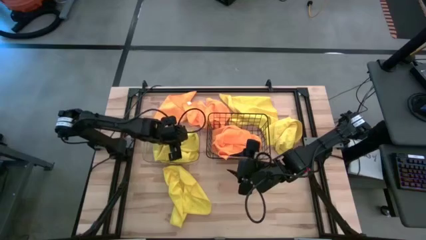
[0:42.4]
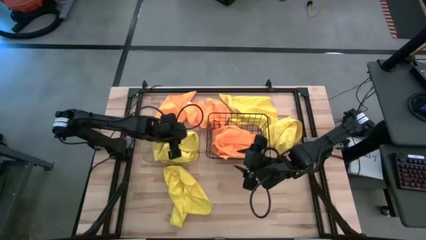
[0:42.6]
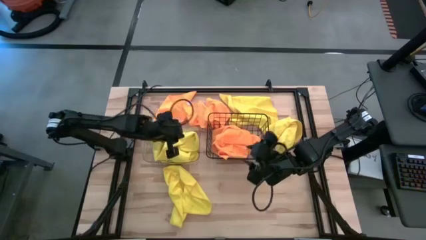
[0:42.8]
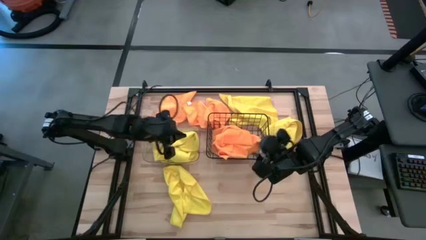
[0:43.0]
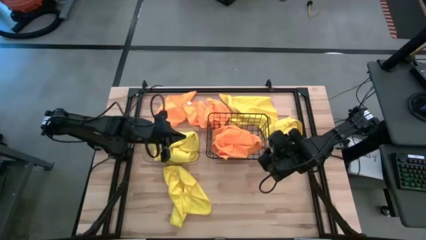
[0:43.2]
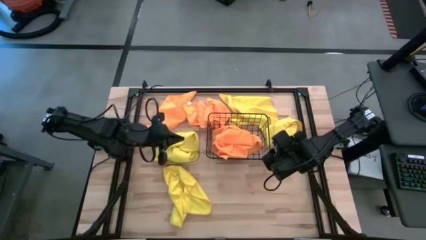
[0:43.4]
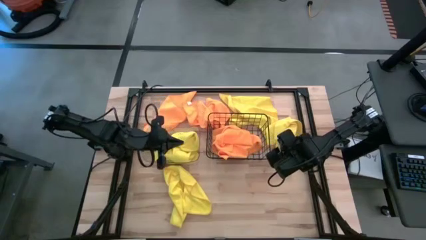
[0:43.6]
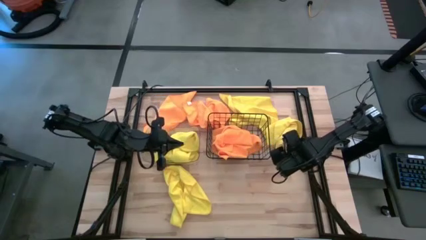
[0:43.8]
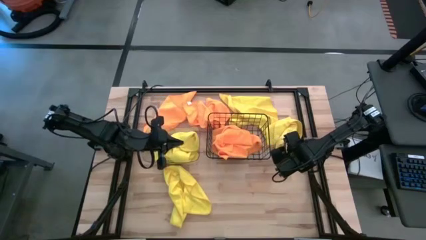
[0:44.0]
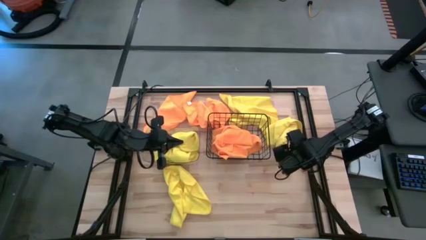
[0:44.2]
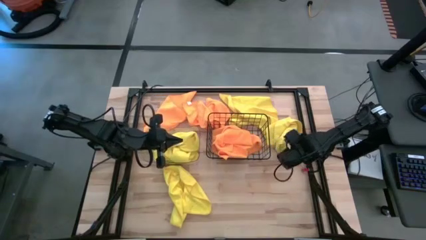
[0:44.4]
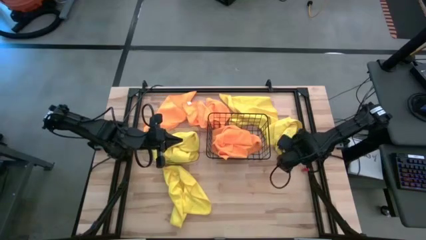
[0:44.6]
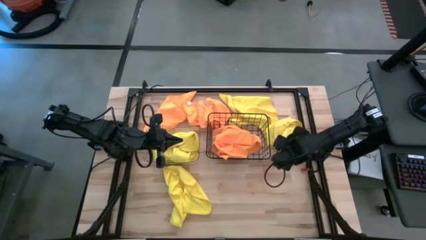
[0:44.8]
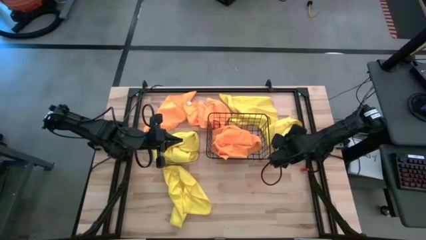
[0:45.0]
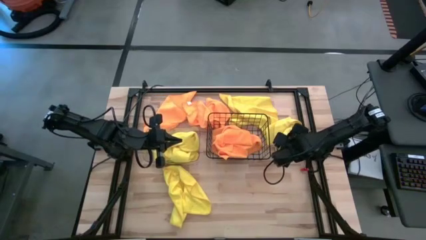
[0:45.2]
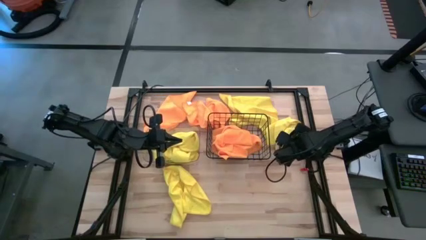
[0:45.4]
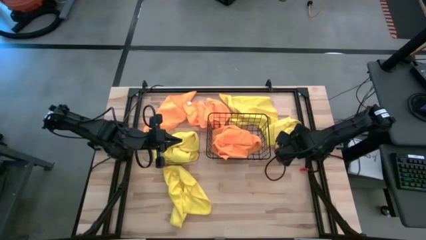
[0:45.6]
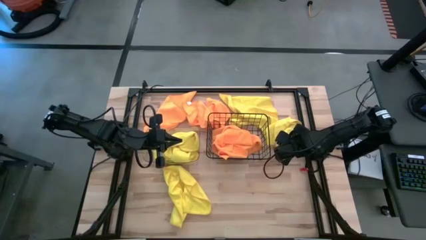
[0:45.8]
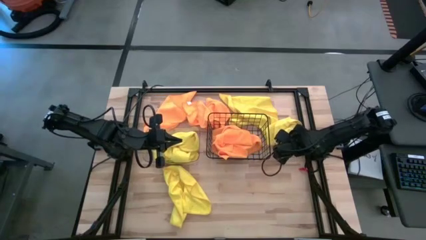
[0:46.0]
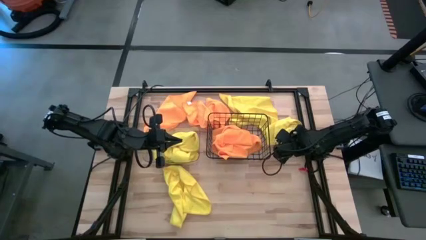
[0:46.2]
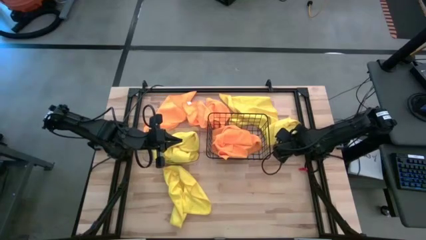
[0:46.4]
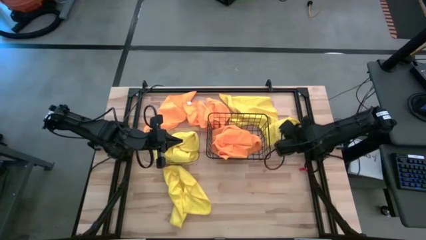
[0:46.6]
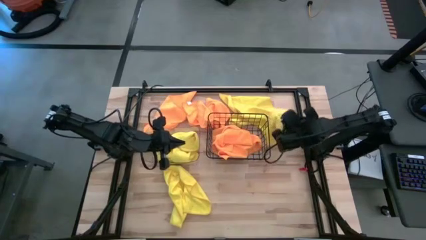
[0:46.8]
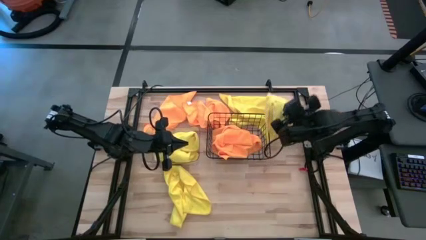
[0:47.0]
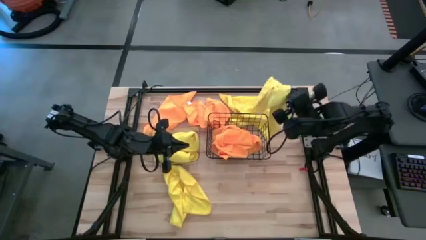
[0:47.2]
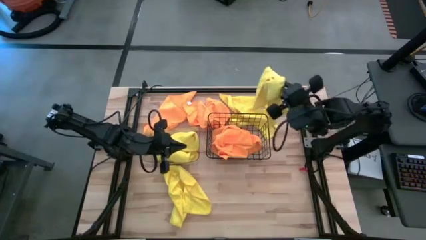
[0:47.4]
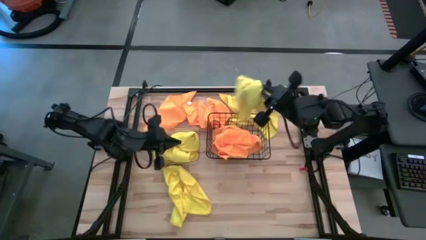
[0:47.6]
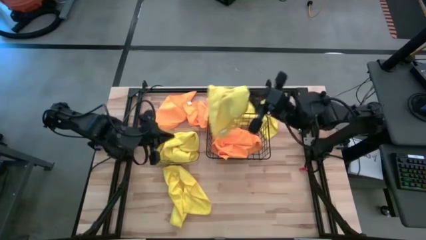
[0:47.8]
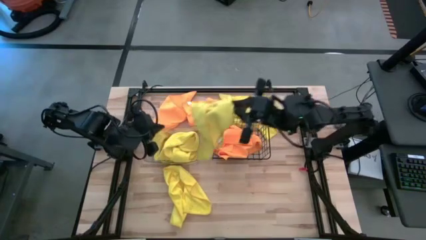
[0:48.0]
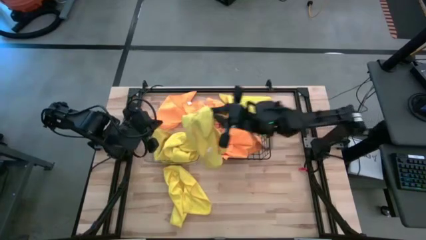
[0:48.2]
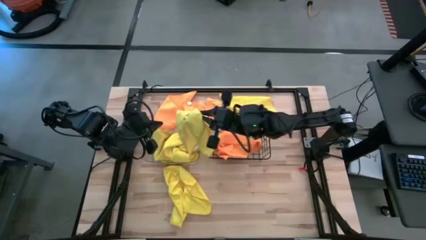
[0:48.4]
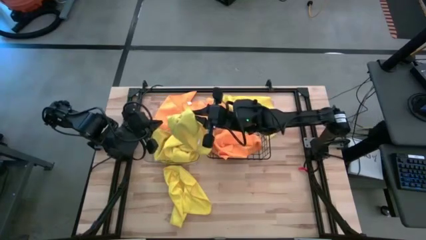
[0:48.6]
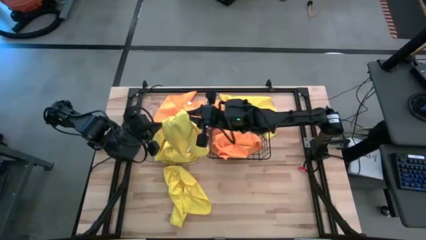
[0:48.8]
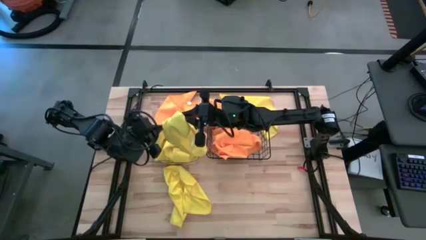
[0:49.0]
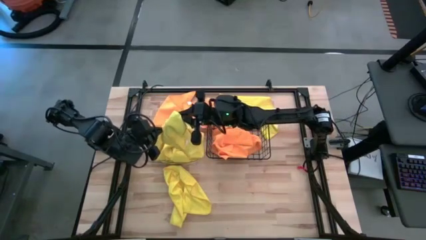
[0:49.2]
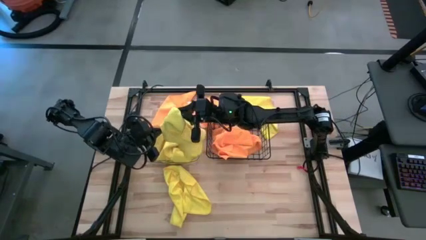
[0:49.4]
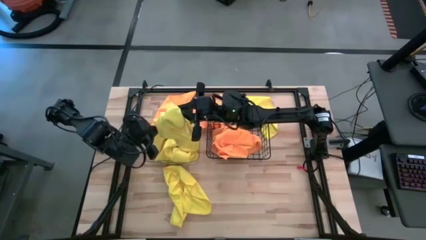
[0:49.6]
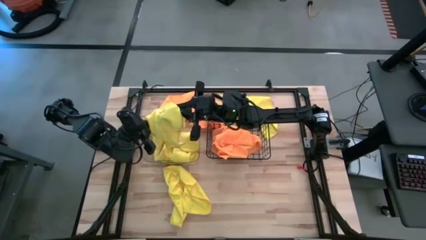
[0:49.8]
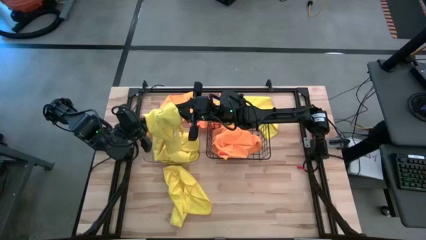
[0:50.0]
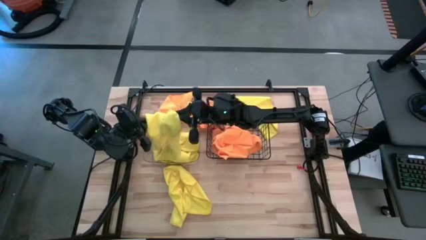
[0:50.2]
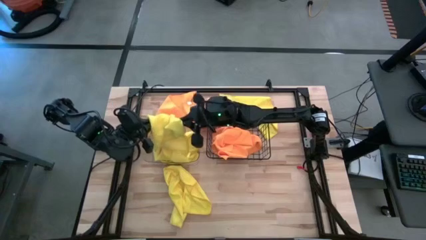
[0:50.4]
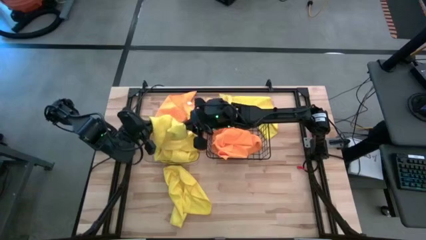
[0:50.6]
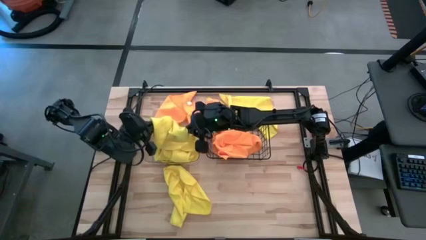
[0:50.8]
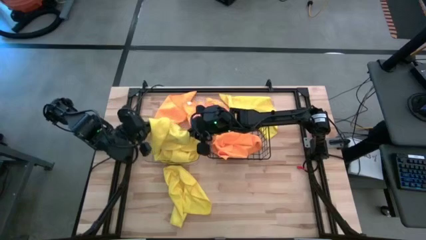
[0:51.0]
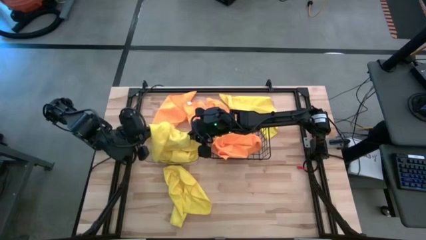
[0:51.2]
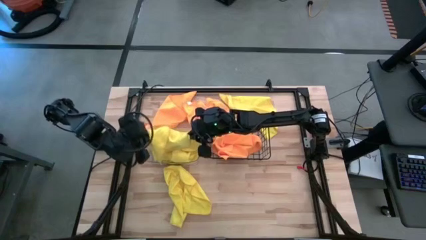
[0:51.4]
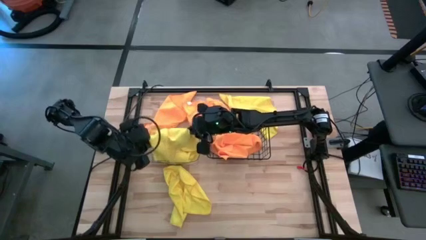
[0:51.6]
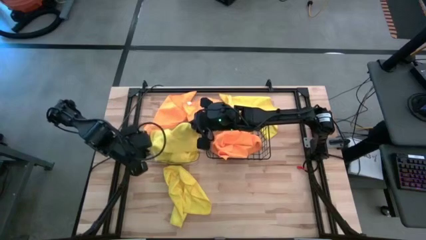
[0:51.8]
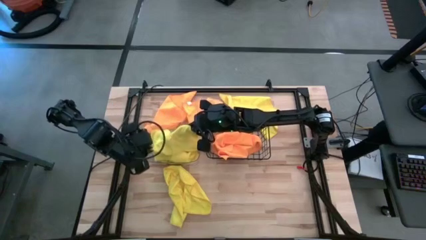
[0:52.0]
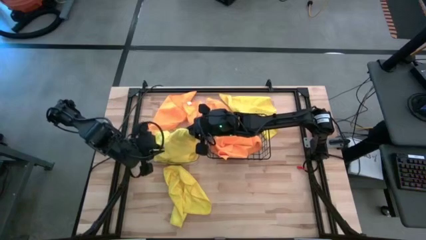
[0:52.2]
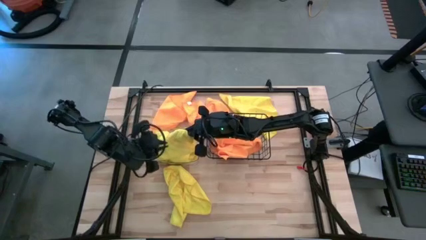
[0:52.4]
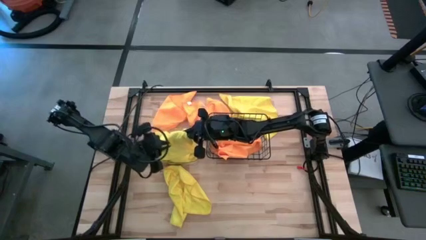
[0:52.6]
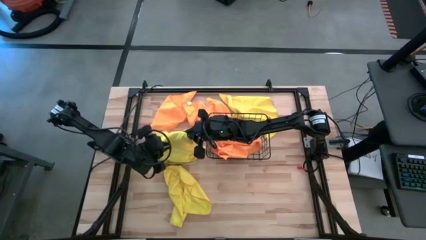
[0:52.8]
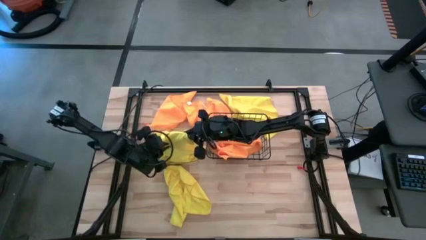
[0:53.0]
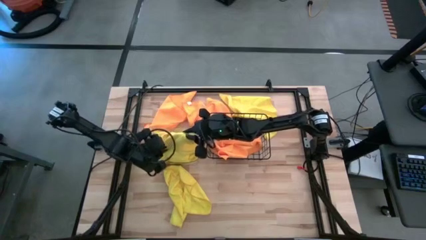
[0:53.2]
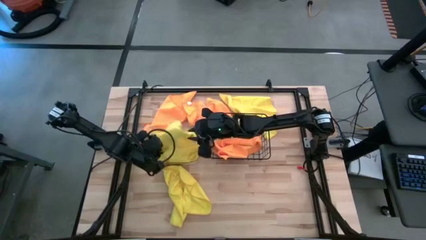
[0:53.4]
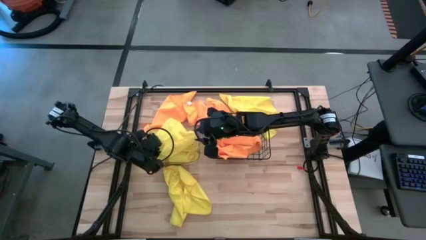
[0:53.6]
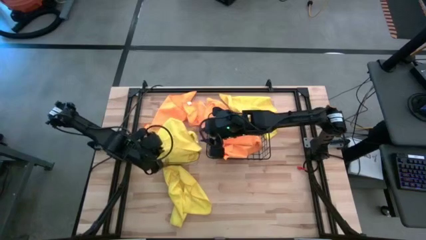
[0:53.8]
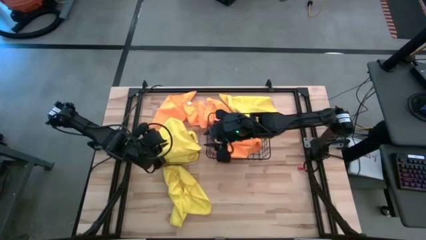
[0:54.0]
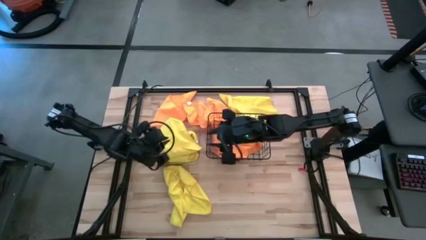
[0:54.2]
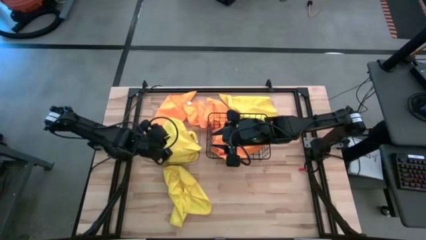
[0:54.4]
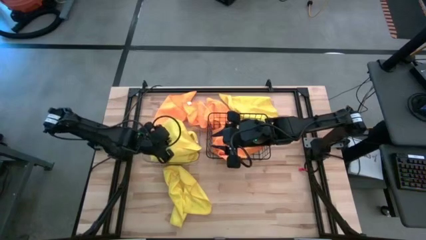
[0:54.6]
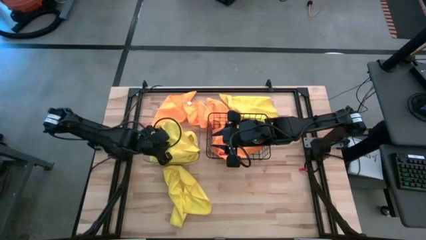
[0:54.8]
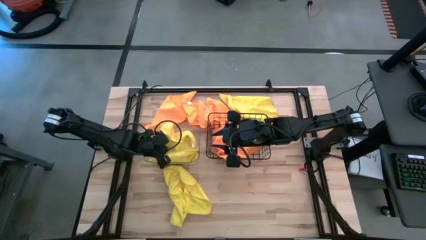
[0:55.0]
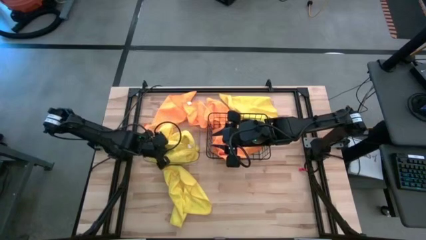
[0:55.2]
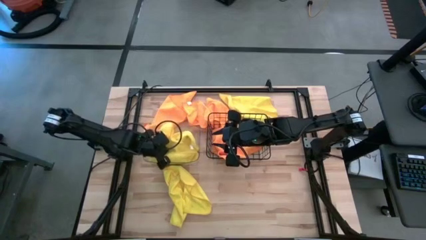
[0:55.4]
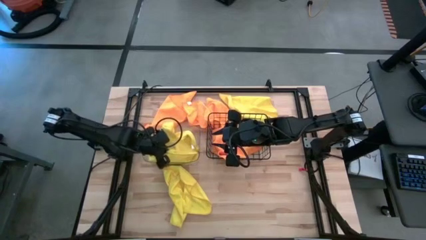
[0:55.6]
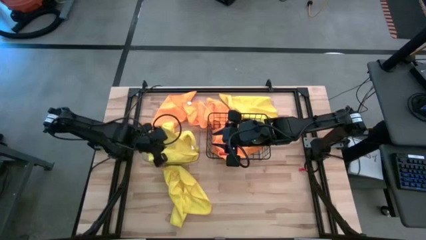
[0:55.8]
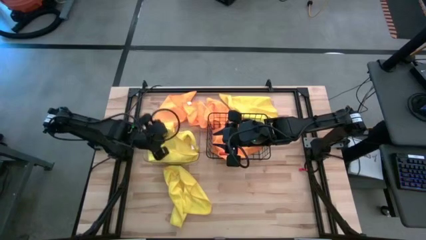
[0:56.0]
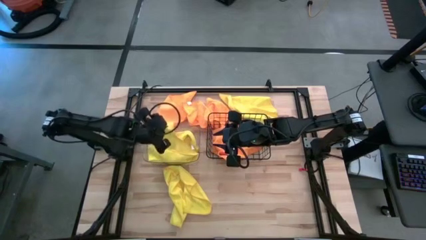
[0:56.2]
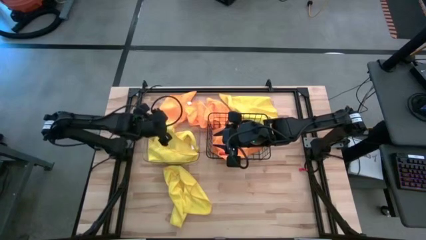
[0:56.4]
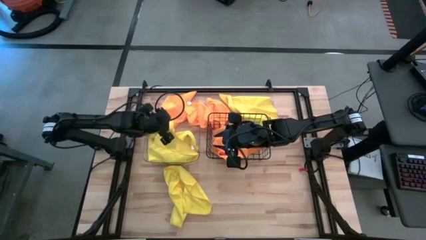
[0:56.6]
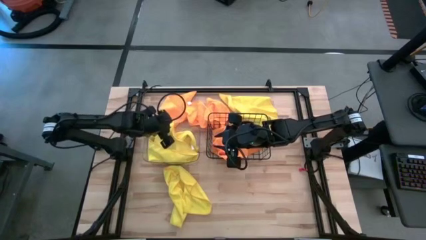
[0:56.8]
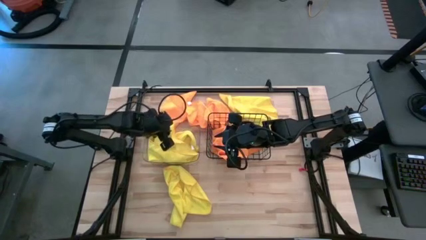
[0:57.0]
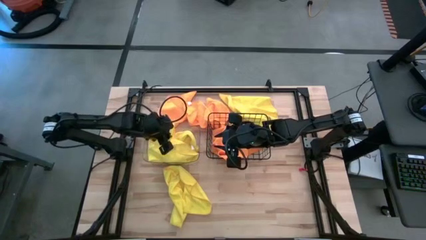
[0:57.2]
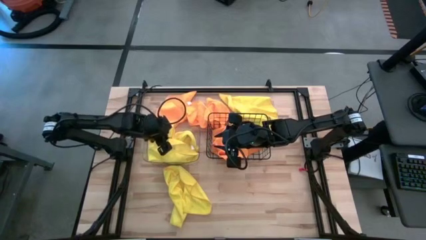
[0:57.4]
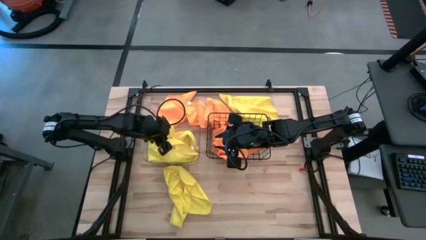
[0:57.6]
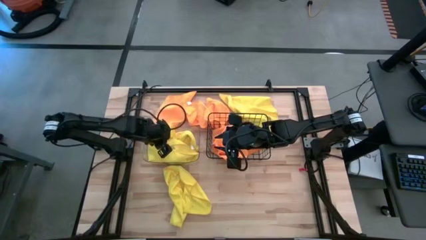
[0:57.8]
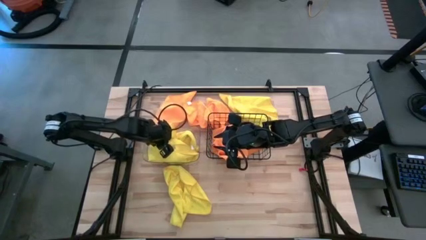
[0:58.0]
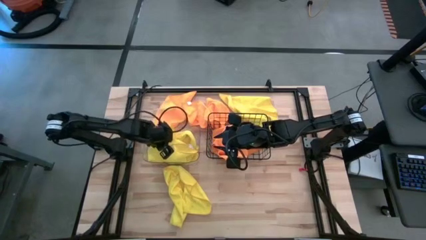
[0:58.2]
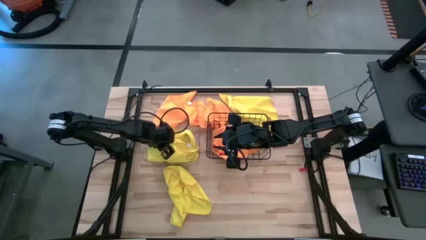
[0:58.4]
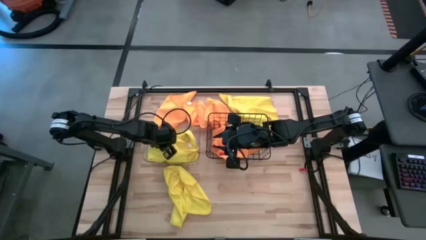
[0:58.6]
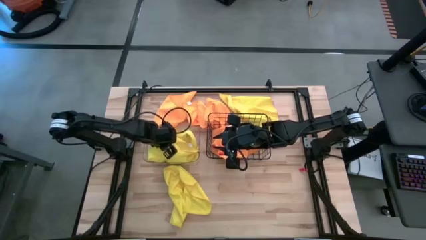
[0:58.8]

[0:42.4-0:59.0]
Task: Sort microfiber towel by color & place in baskets
Put the yellow towel into the transparent bin
